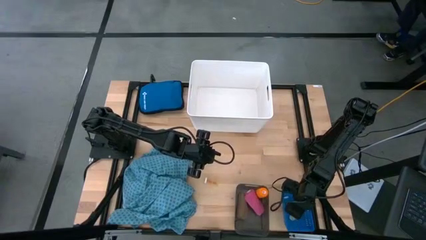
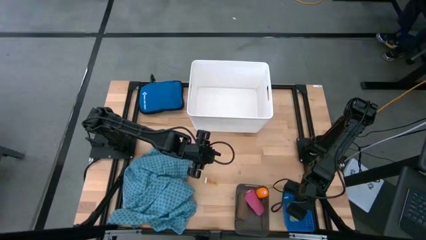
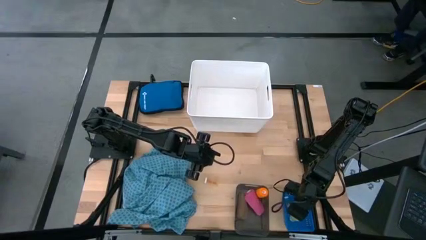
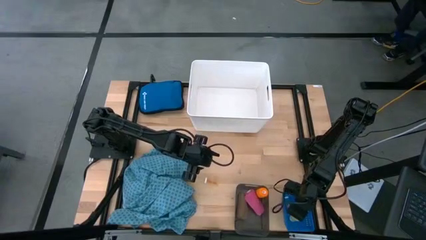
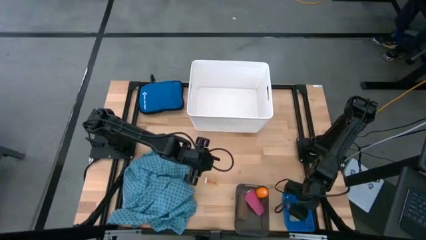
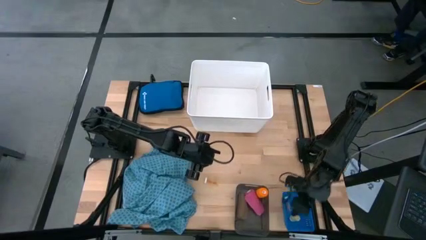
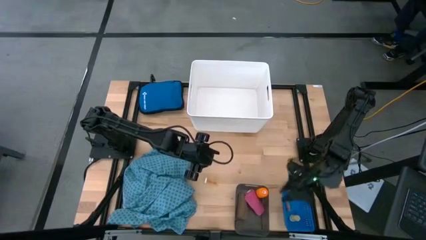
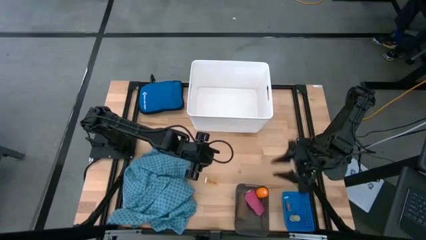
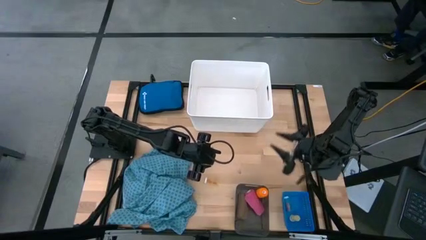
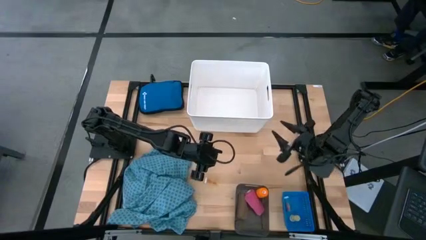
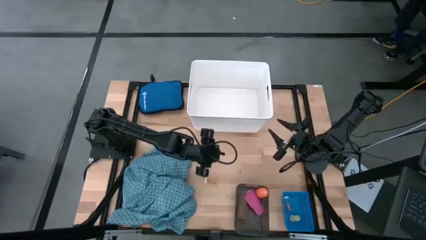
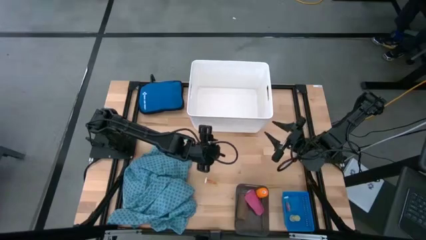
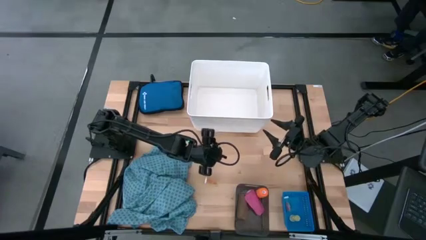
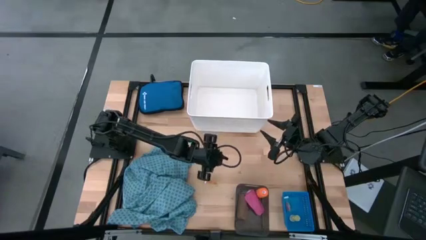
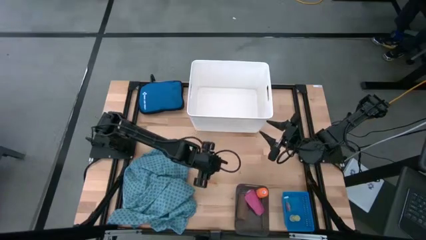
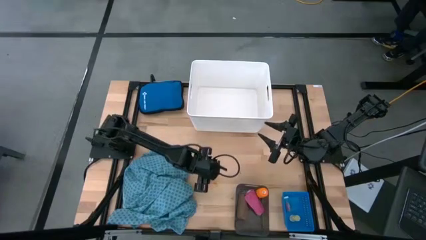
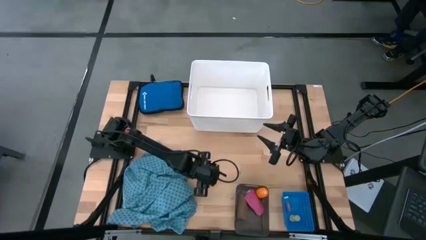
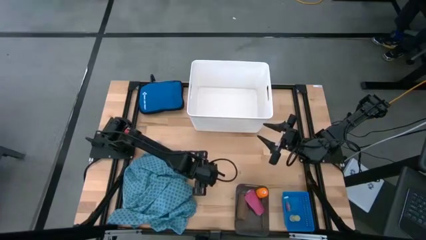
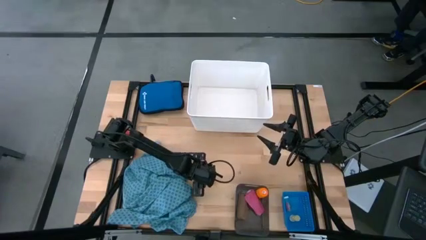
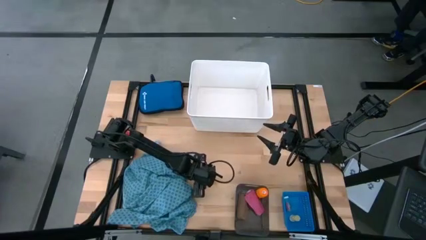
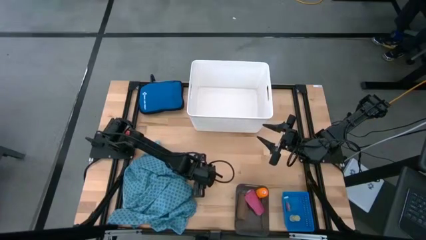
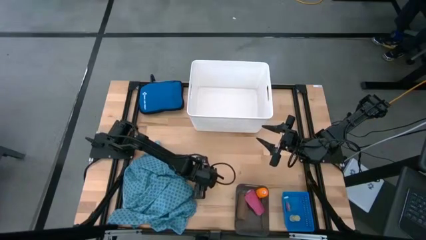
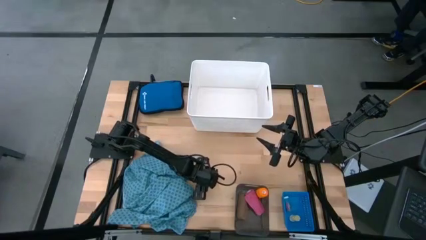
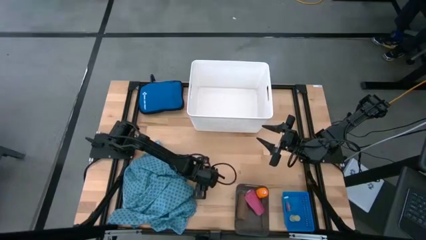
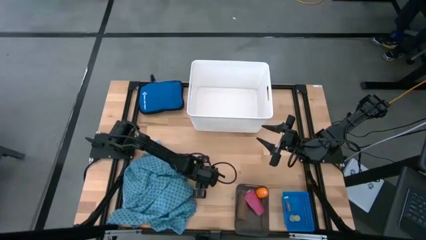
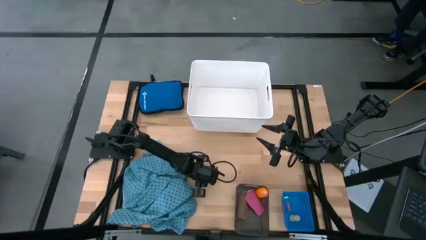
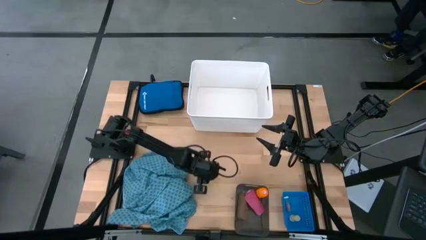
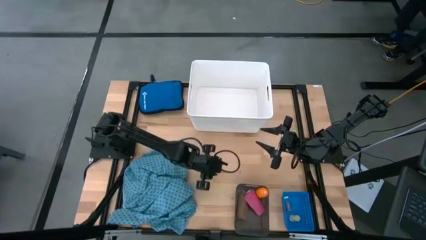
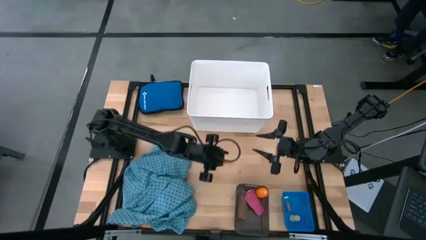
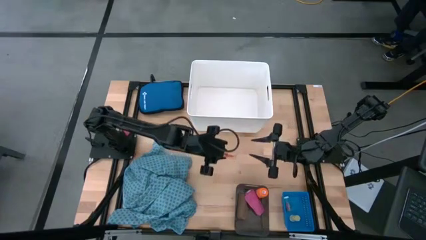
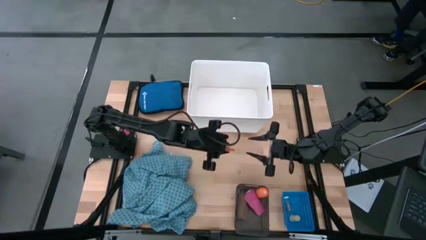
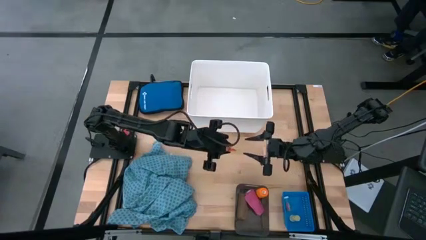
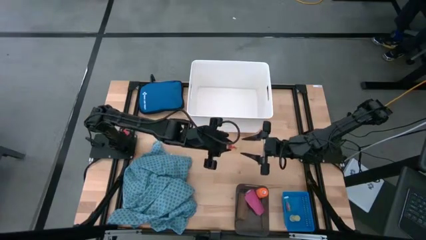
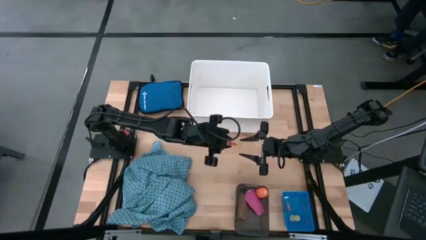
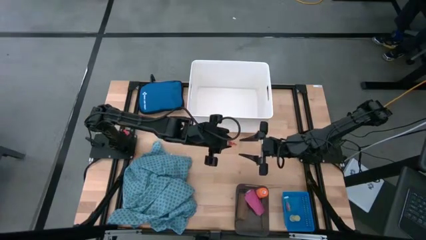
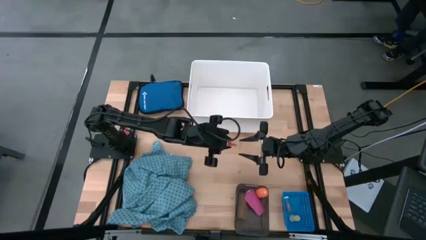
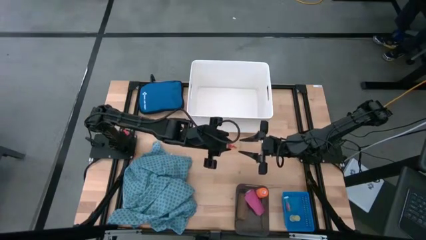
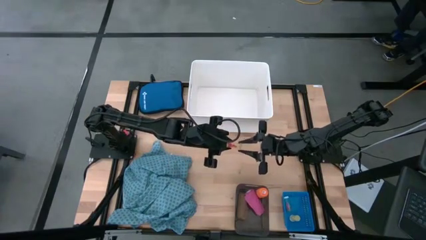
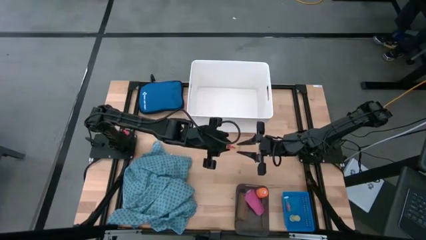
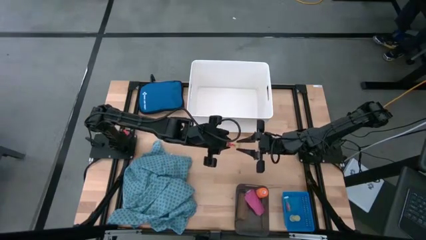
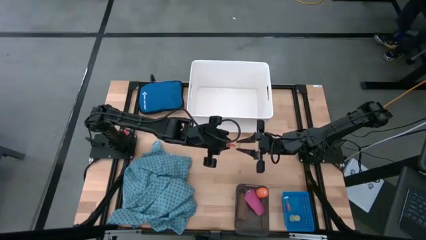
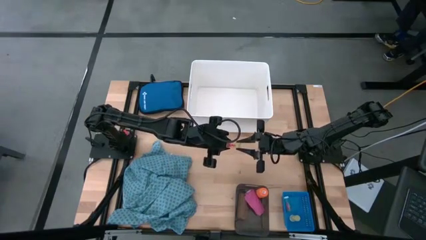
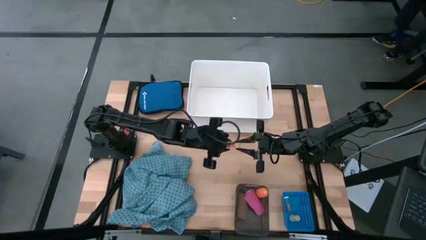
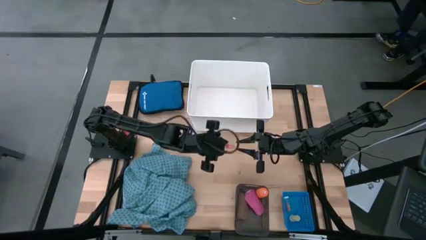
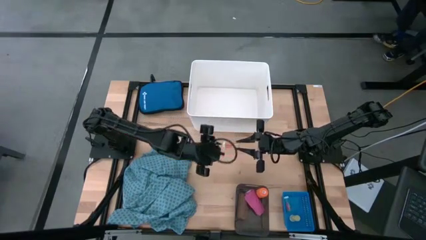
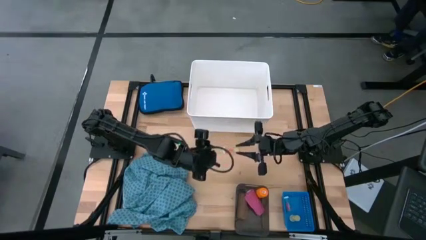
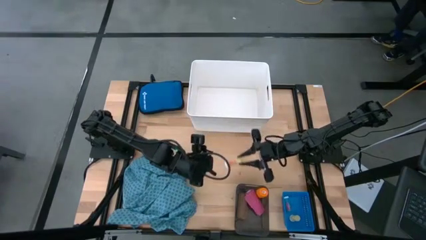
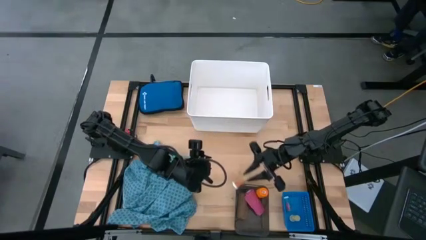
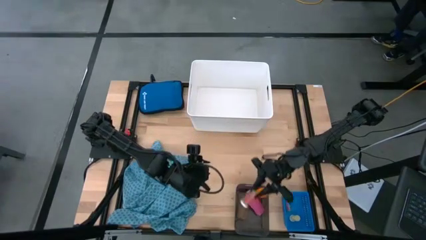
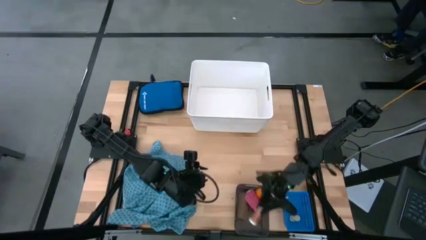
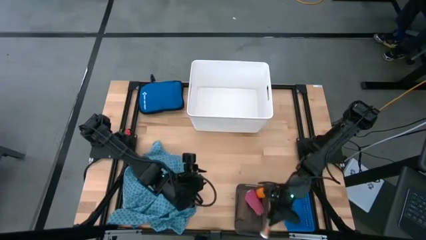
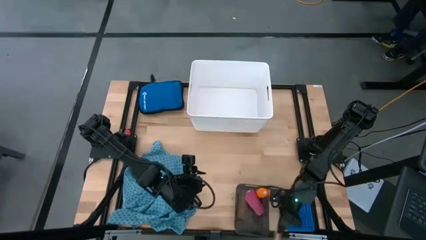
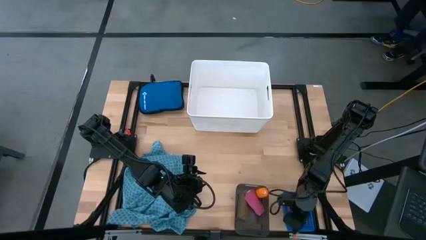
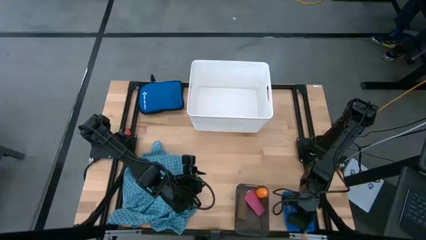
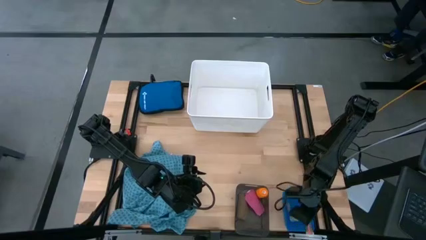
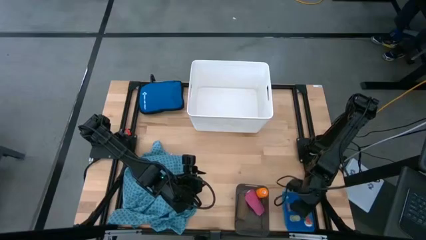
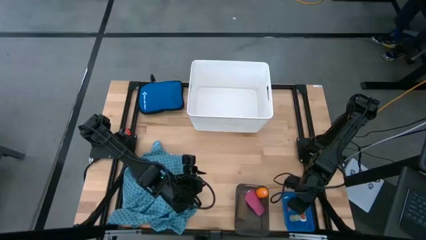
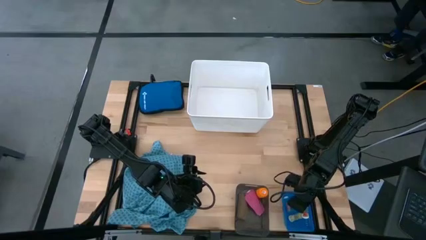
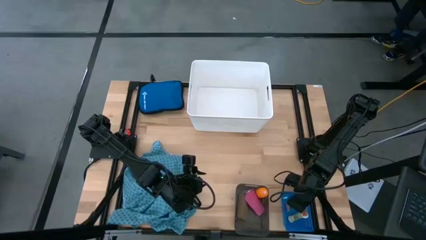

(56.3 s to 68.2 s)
Task: Pick & place medical supplies in basket/bin
Put the yellow pill bottle into the blue bin

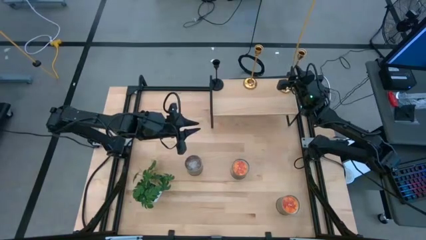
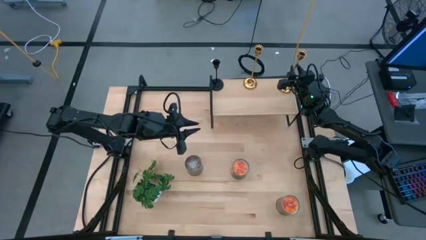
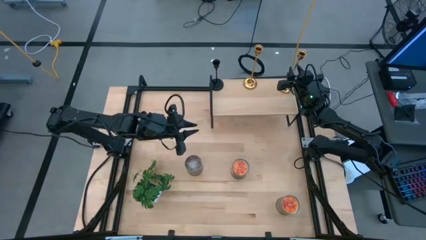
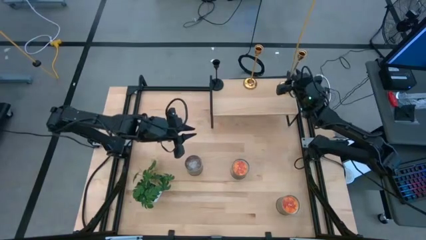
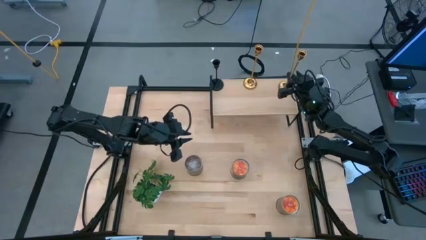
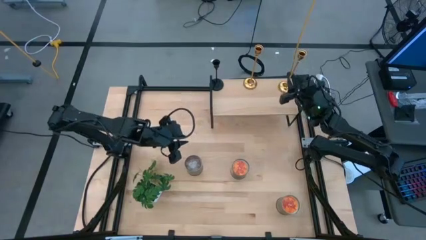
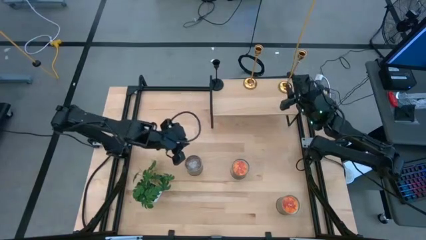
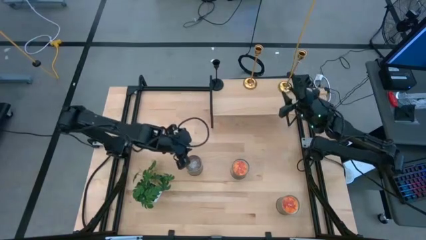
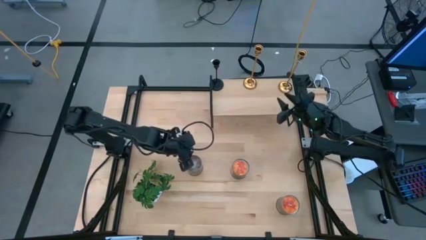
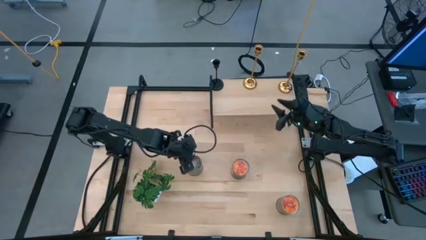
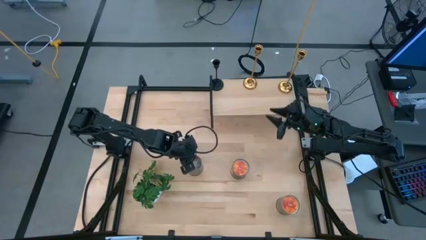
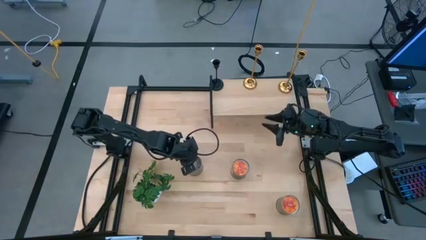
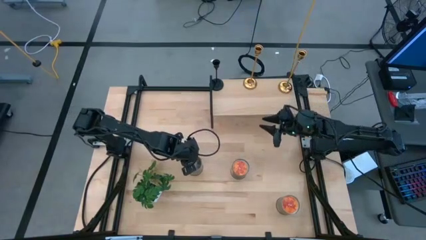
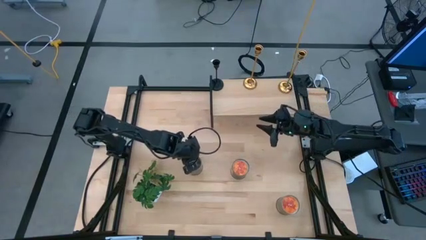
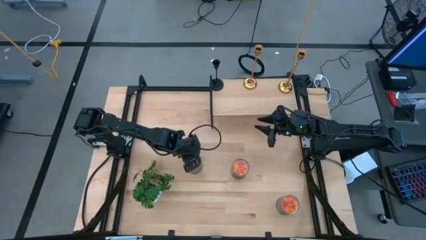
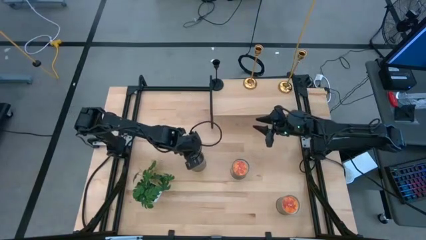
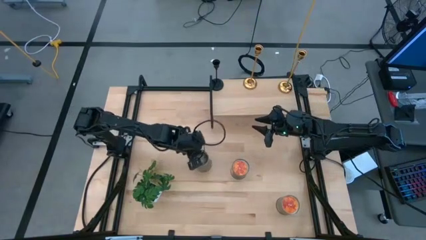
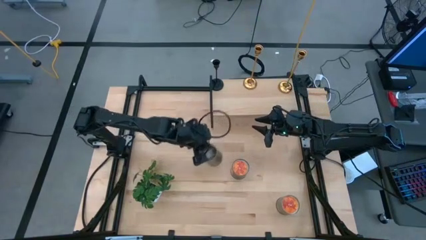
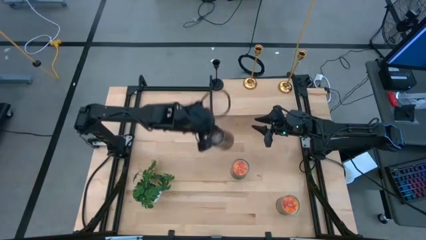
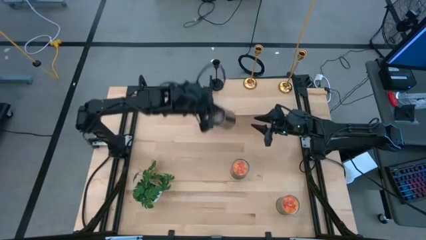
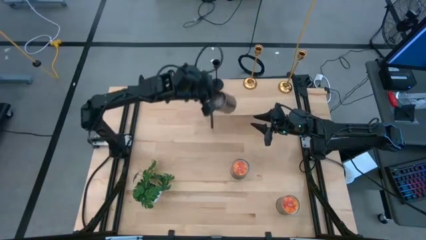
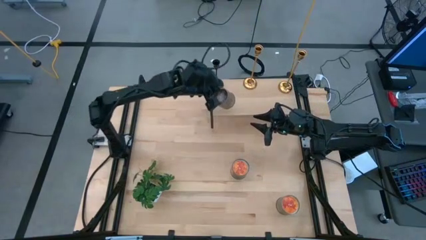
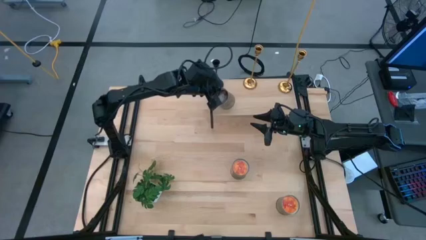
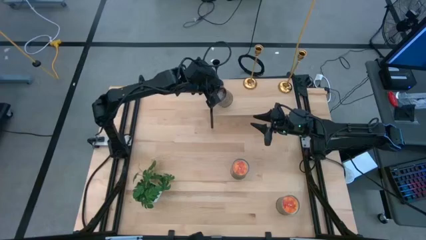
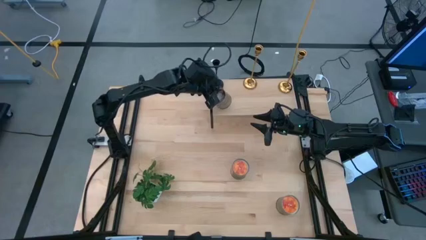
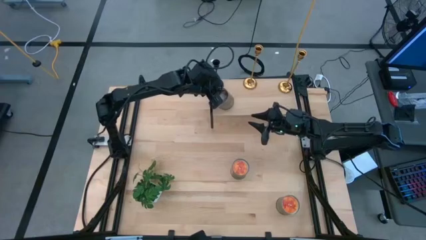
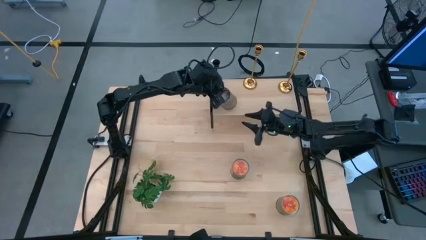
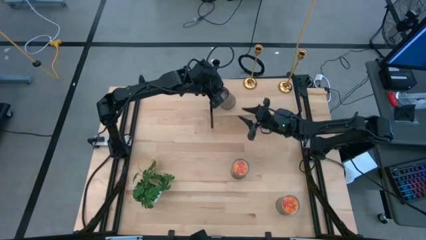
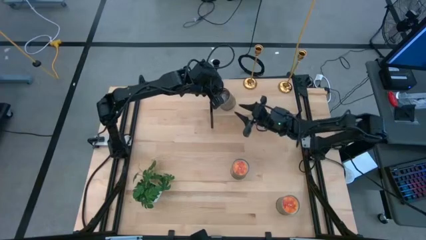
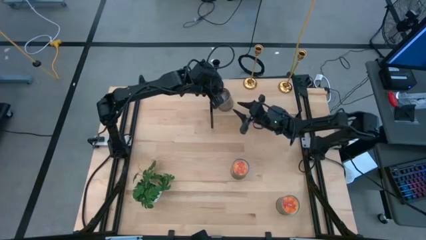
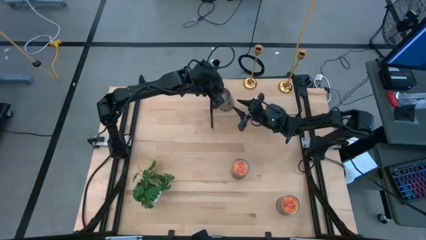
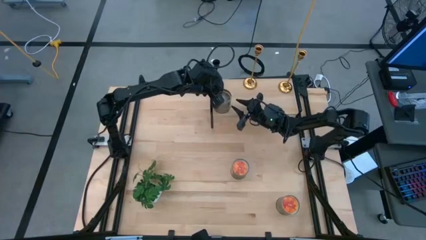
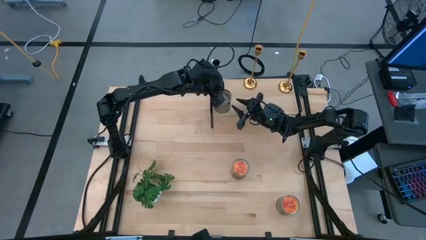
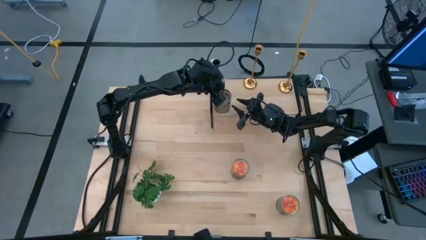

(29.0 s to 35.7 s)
Task: Pick & Place candle stick holders
Put the brown scented candle on the shelf
